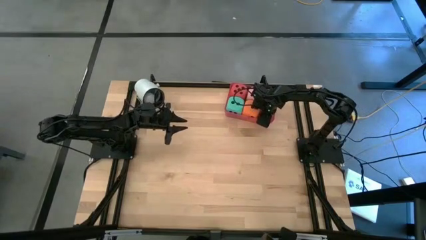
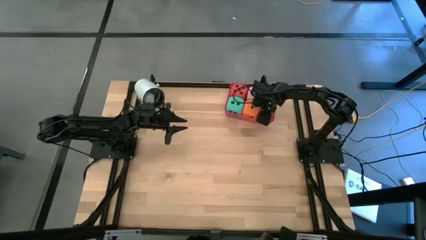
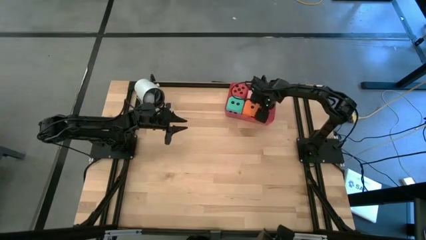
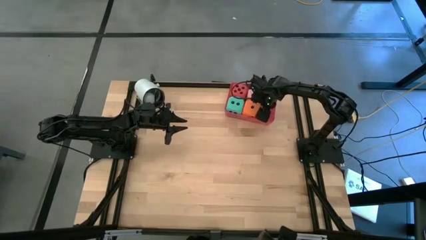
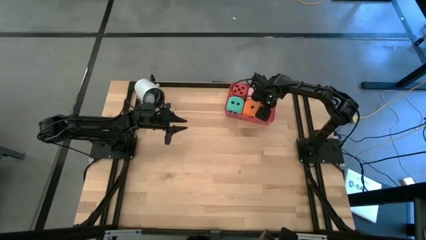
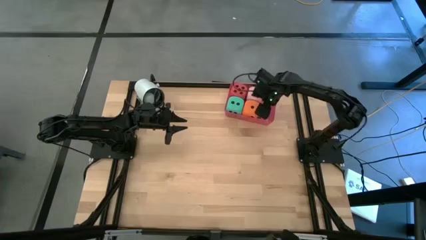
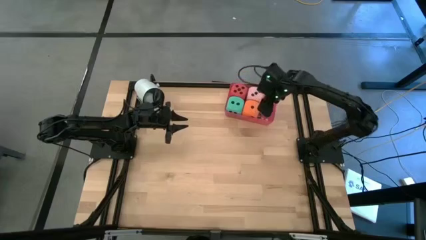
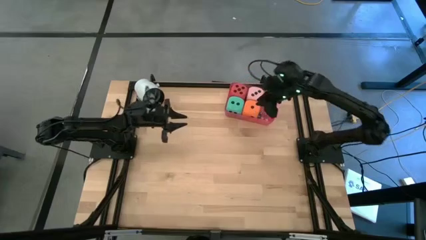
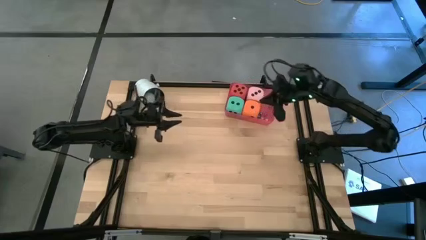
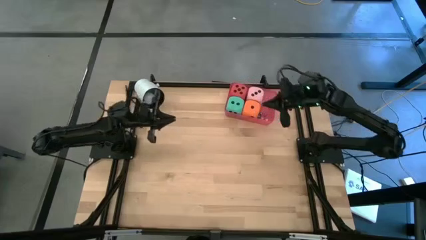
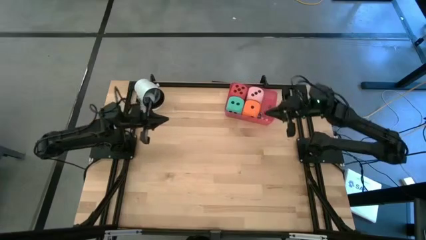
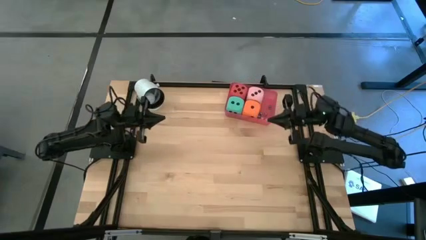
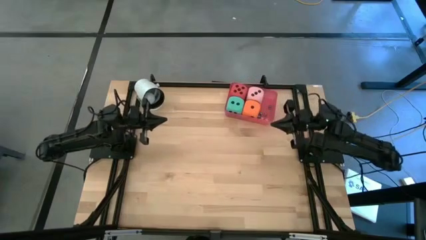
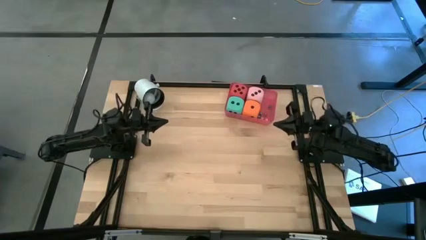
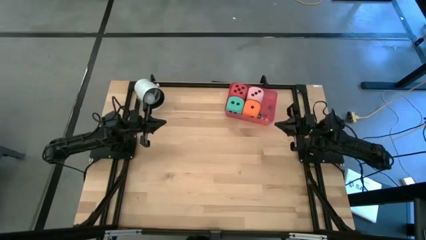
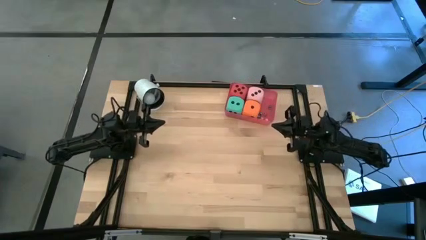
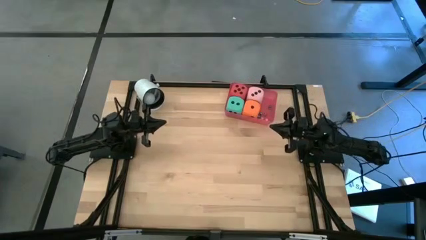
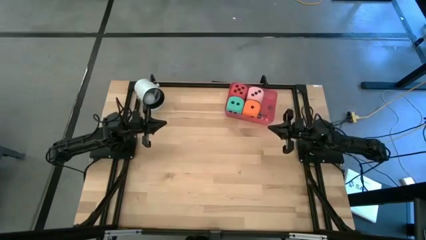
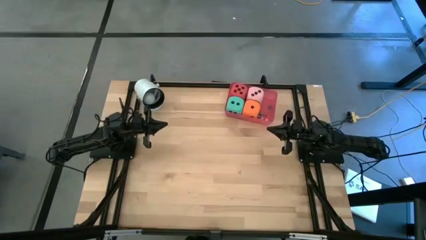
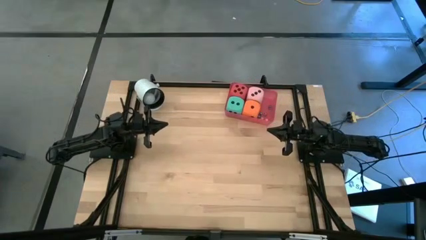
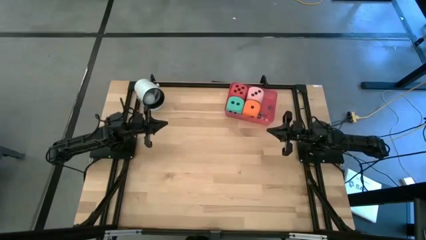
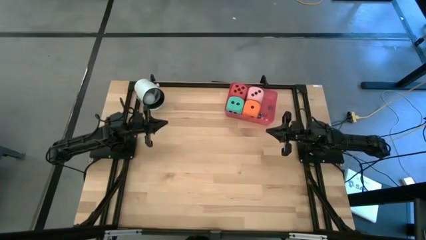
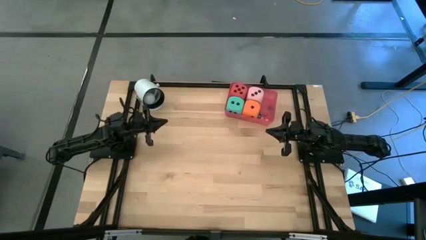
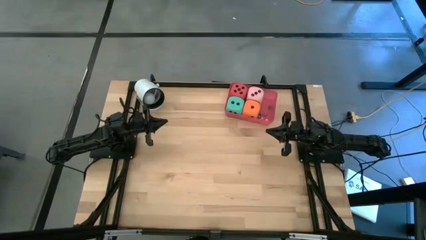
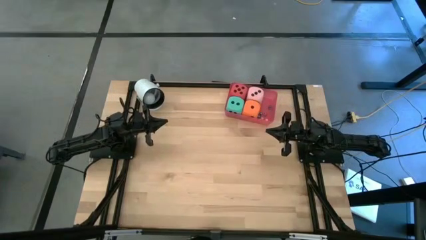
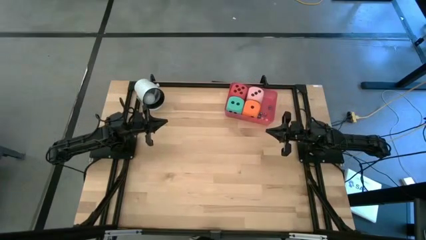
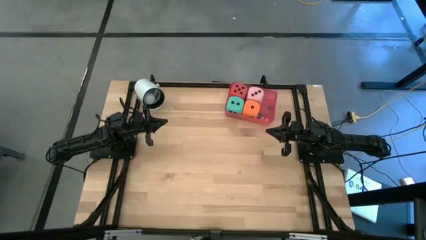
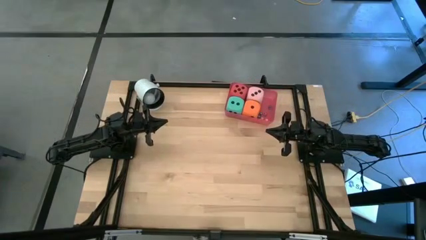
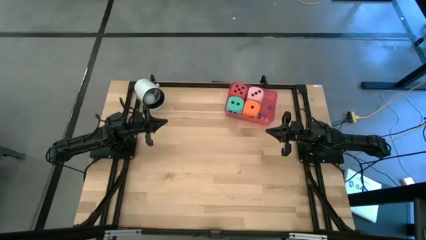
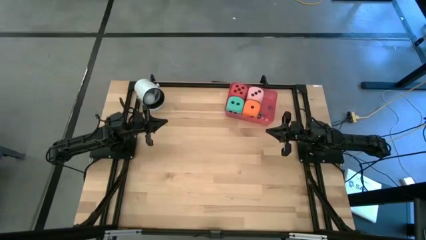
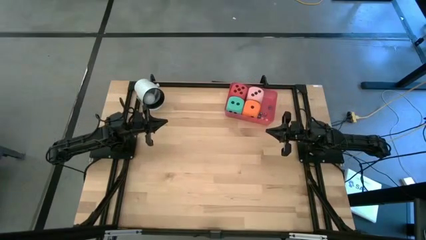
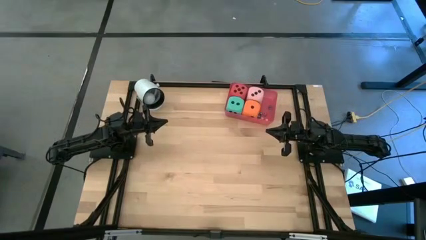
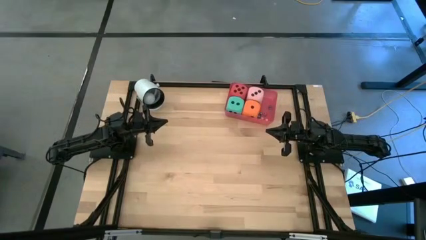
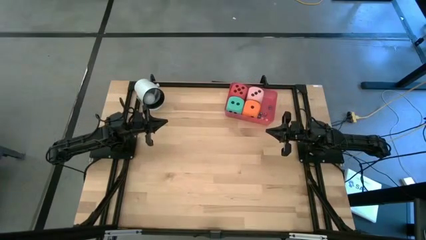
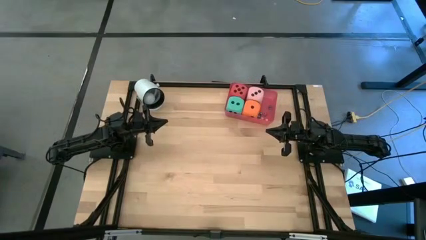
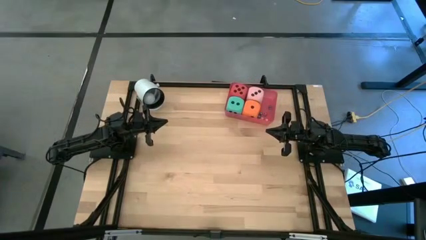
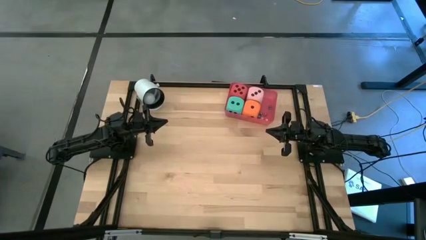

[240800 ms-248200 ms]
Task: Pick & Place Dice
Return to Home Position

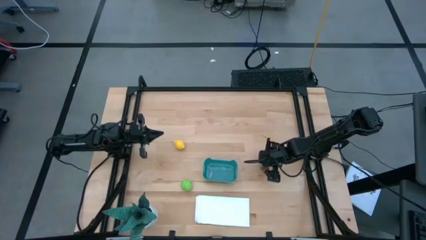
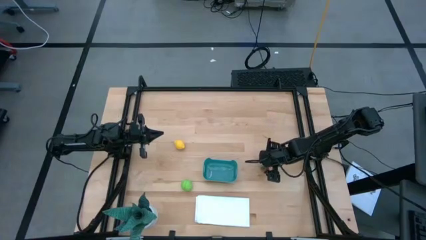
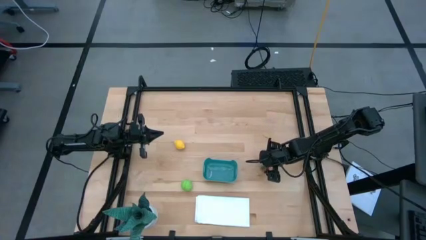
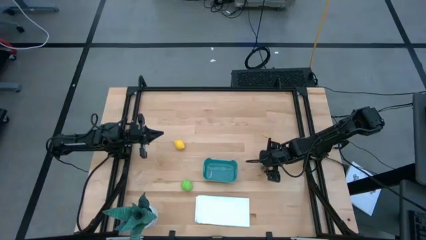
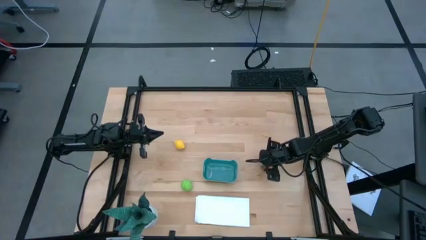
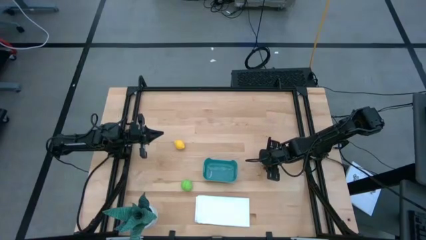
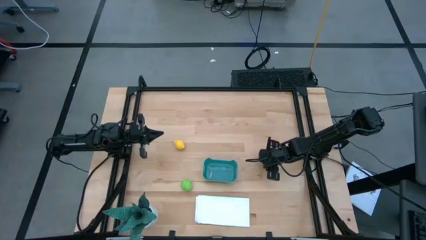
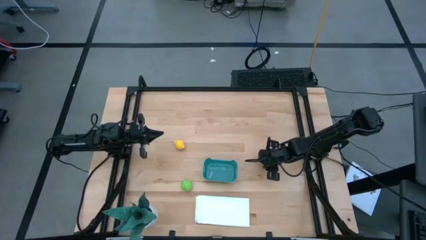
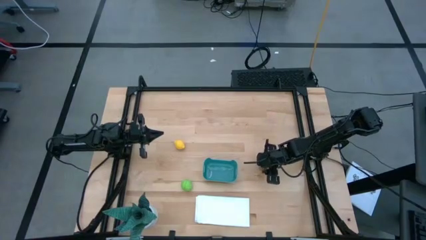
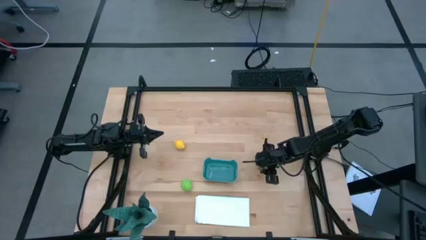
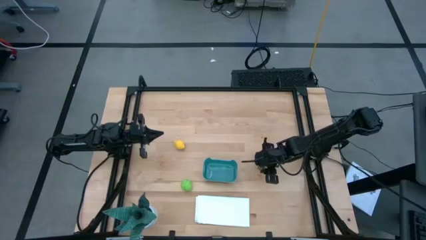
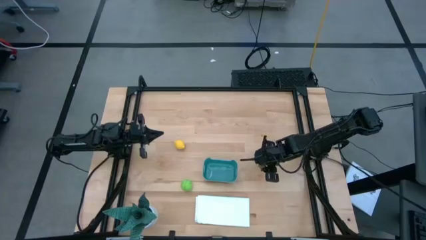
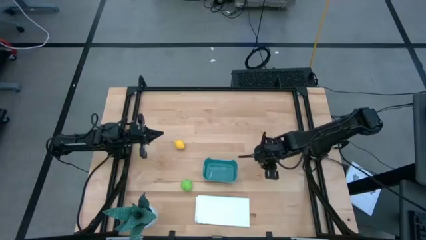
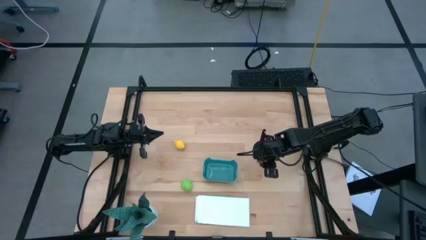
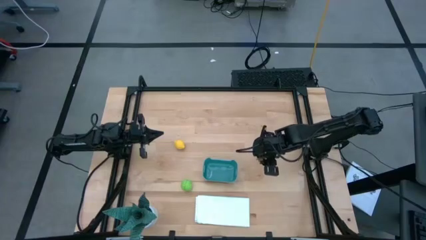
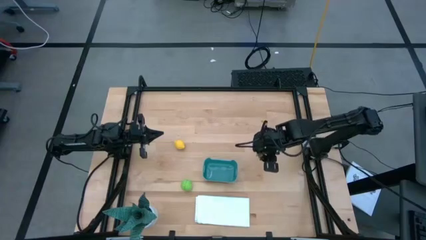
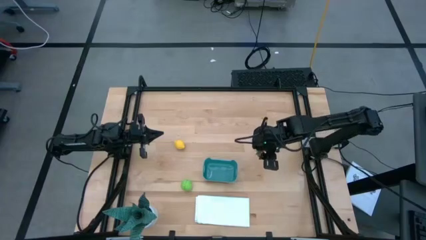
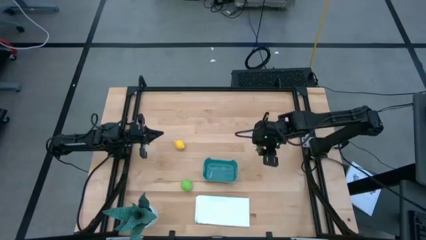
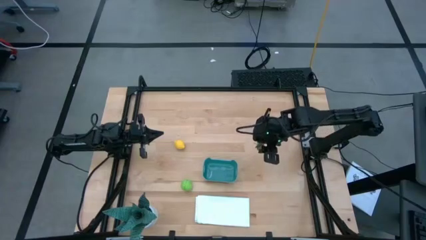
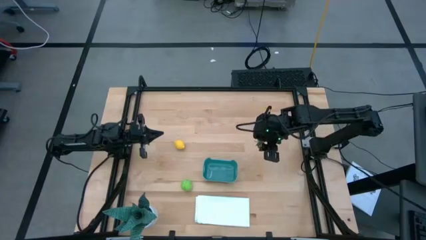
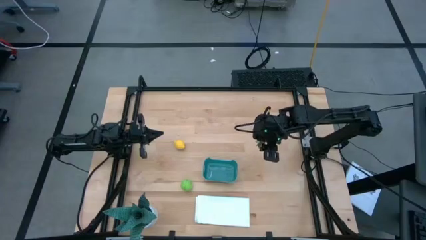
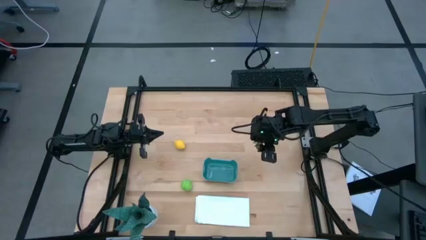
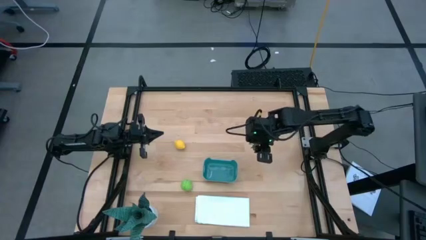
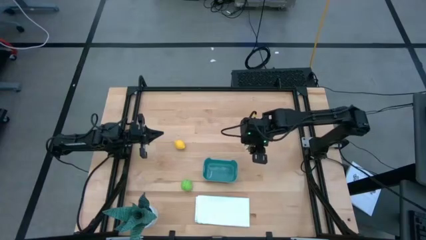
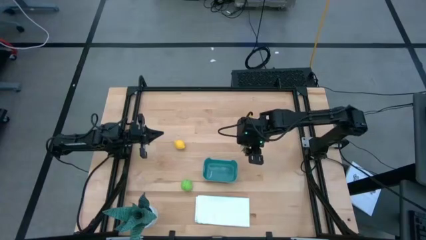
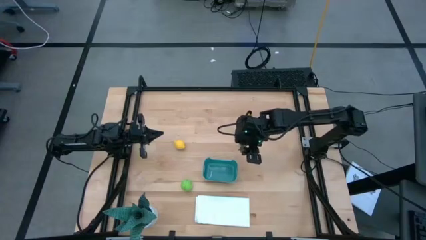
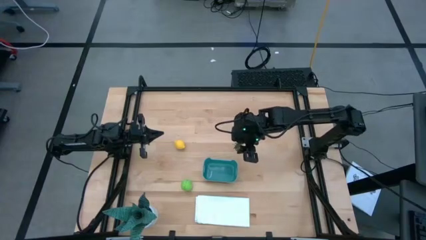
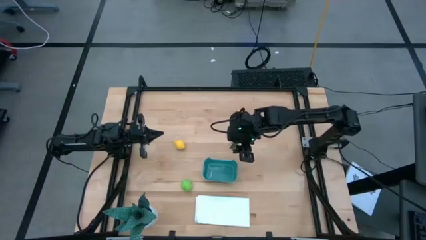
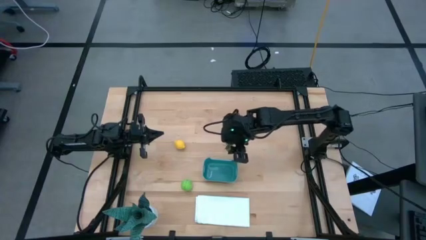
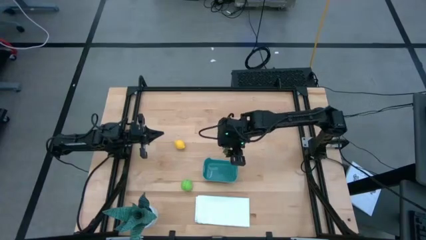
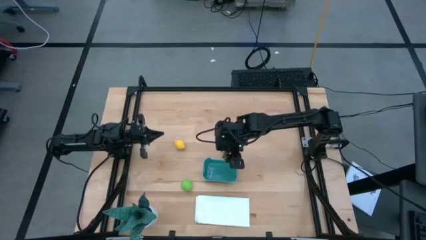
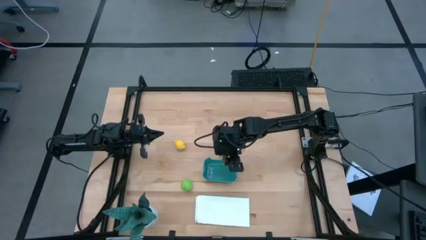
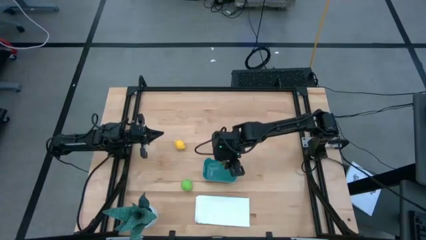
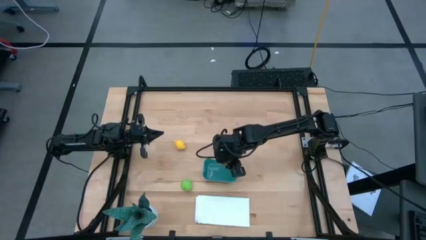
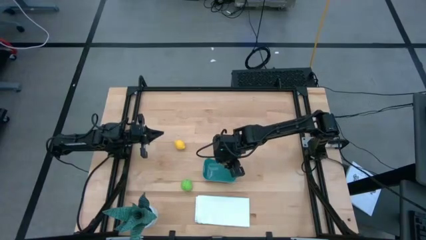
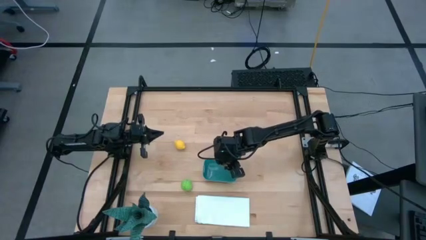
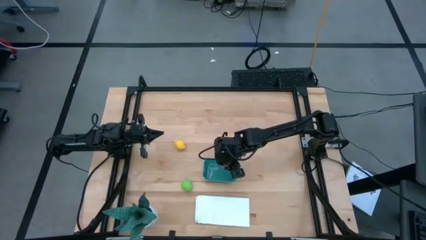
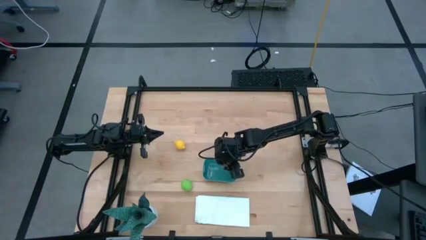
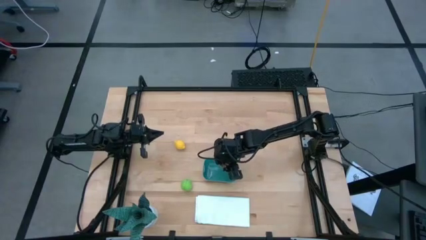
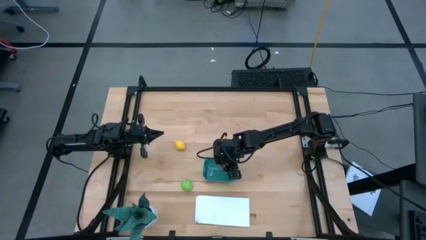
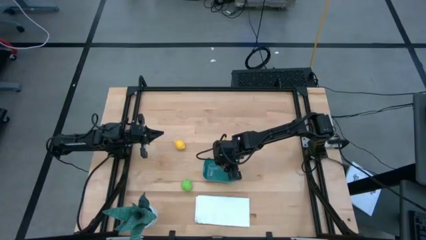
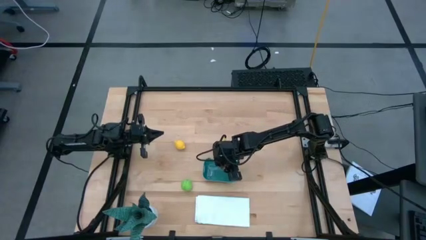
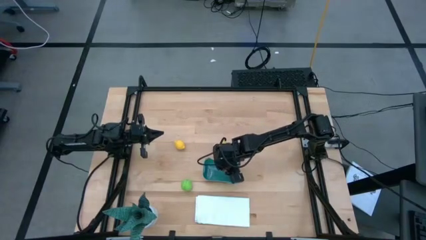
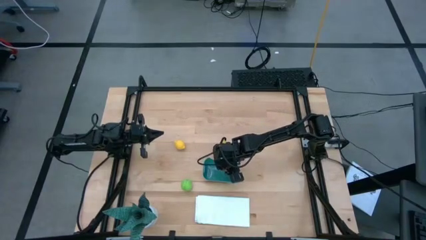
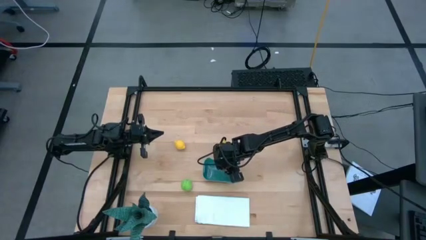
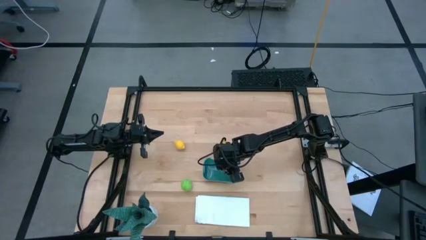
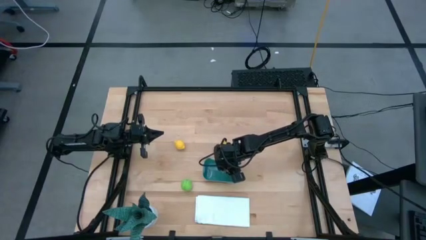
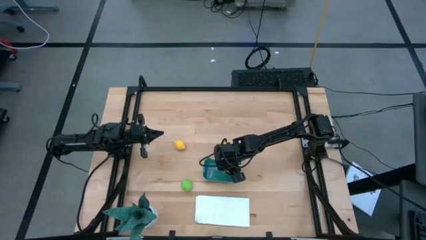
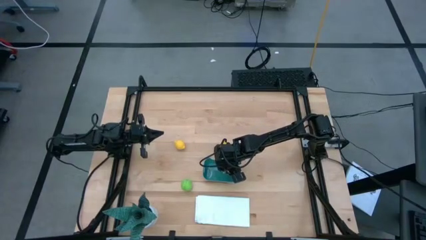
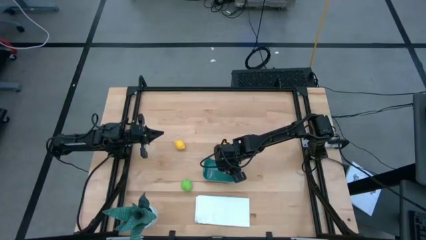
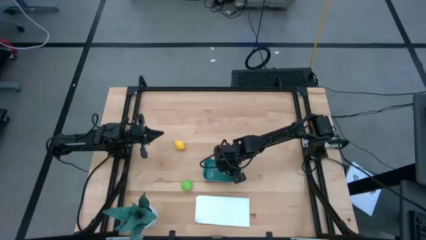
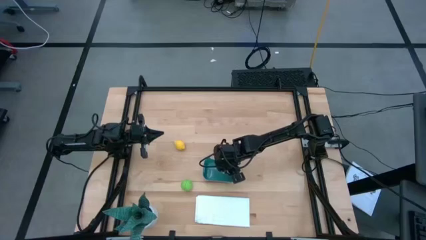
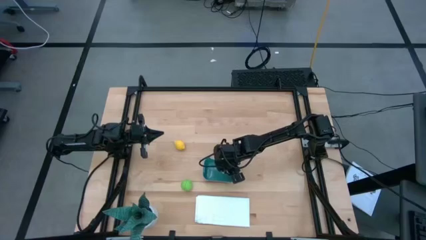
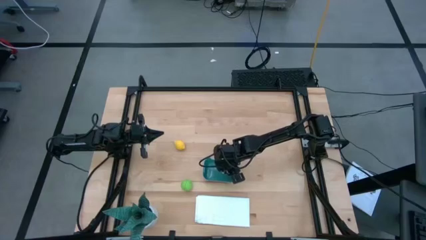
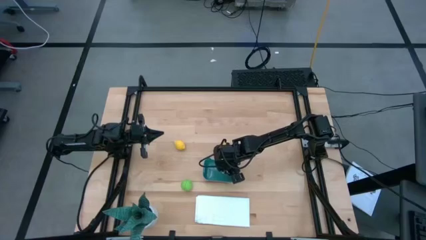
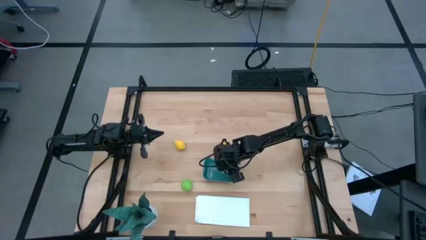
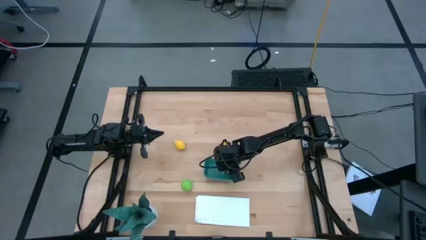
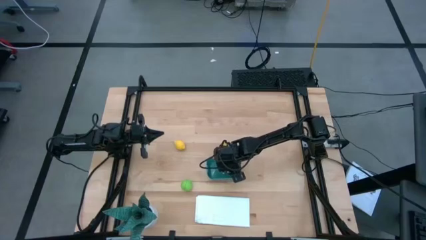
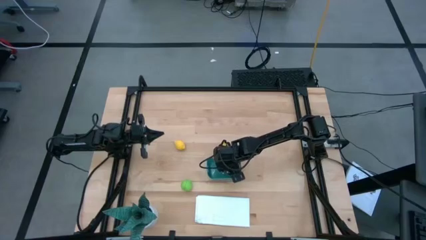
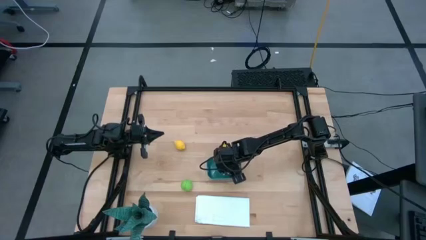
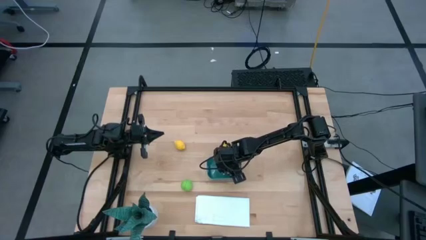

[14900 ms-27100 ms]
Task: Pick and placing Produce into tupperware
Put the strawberry into the green bin
